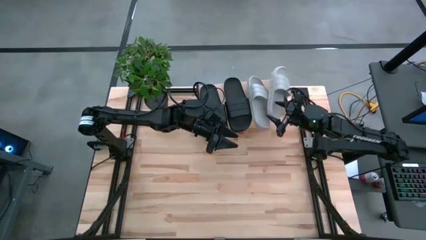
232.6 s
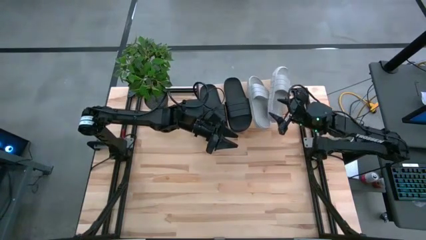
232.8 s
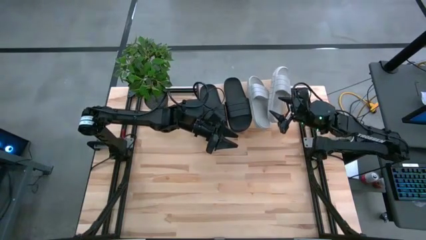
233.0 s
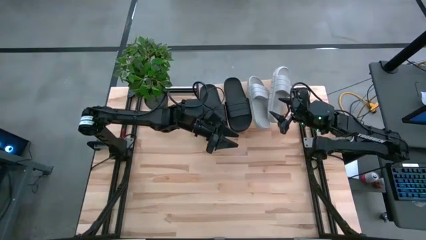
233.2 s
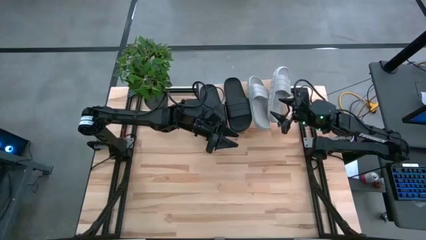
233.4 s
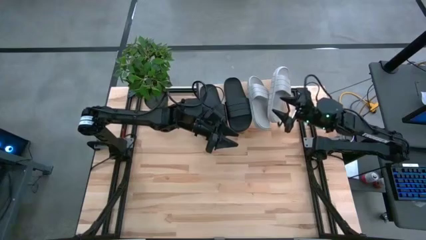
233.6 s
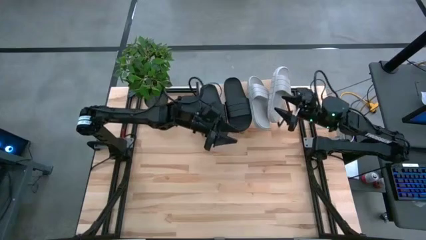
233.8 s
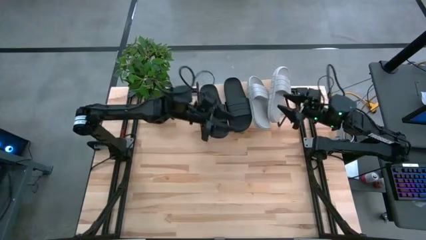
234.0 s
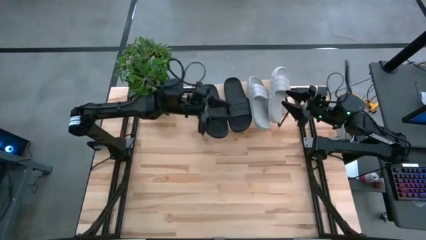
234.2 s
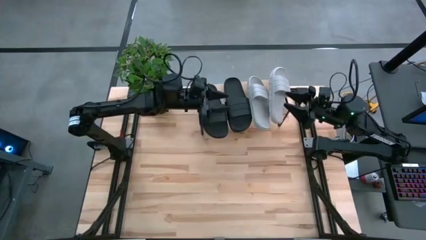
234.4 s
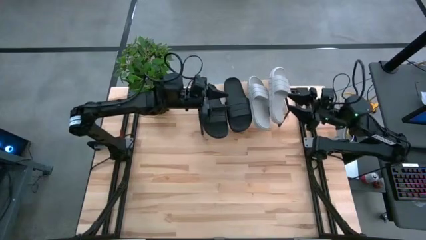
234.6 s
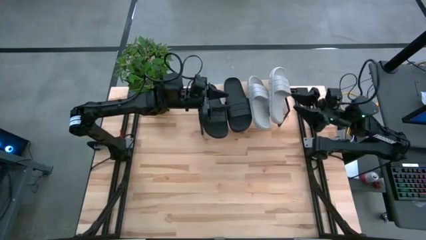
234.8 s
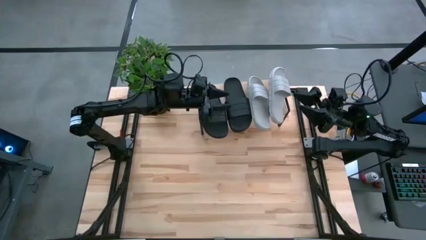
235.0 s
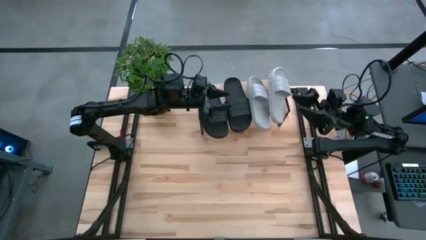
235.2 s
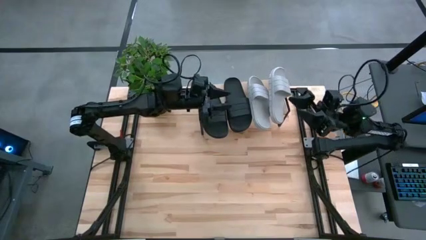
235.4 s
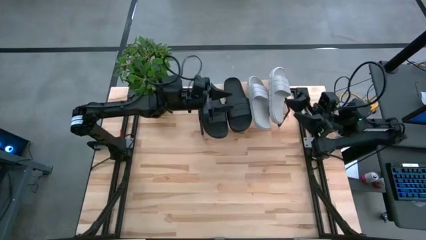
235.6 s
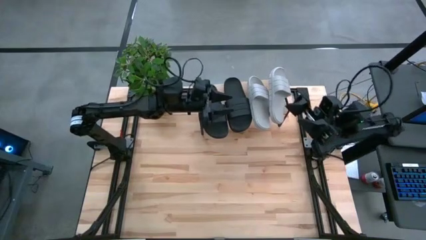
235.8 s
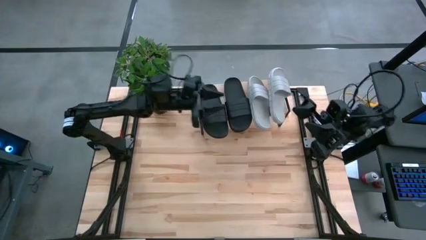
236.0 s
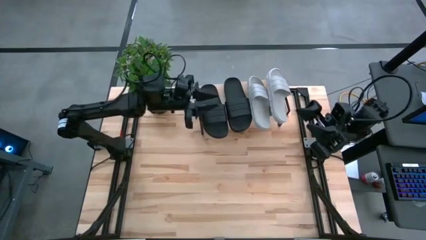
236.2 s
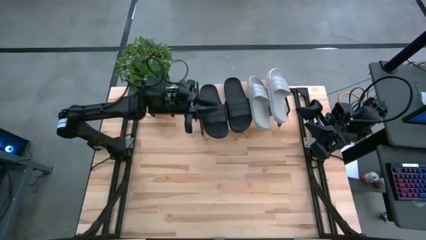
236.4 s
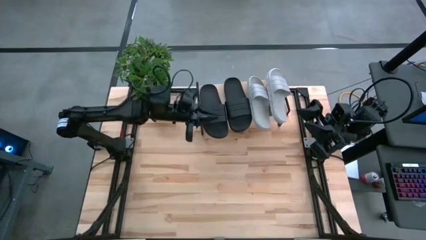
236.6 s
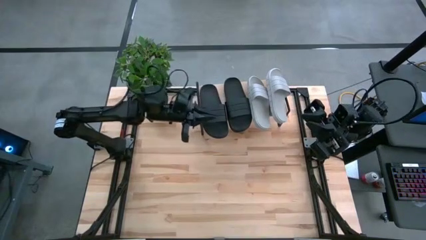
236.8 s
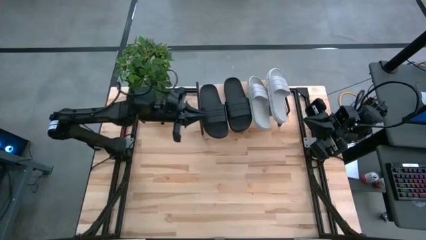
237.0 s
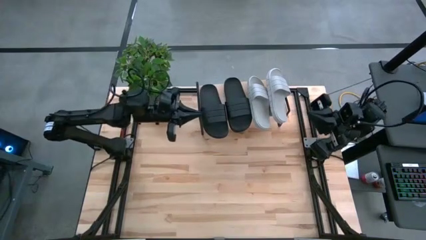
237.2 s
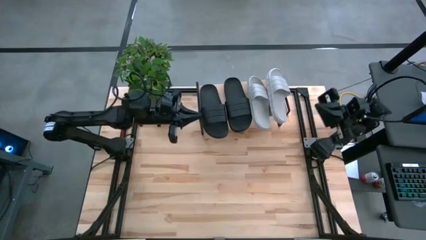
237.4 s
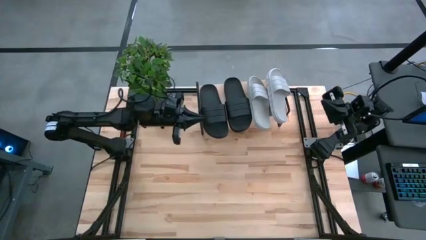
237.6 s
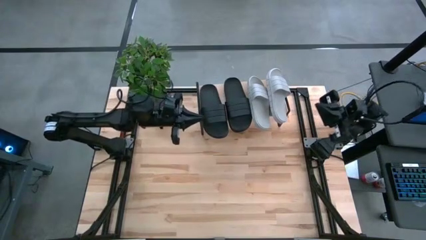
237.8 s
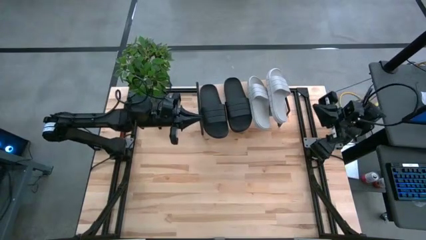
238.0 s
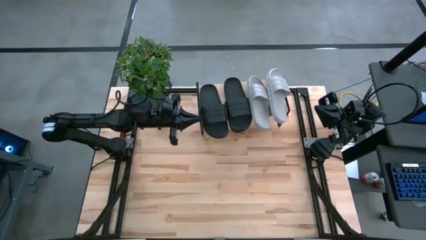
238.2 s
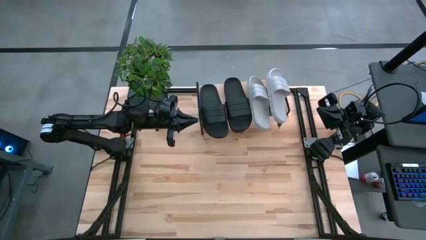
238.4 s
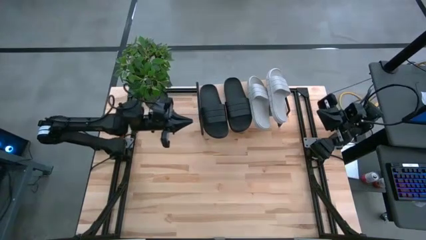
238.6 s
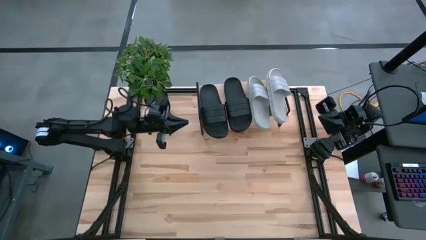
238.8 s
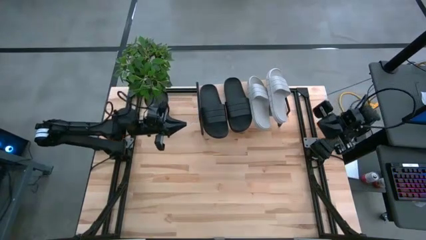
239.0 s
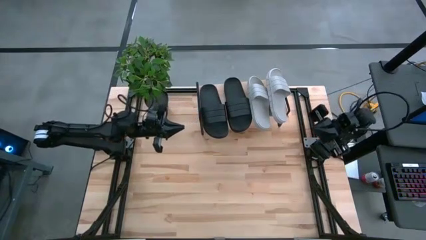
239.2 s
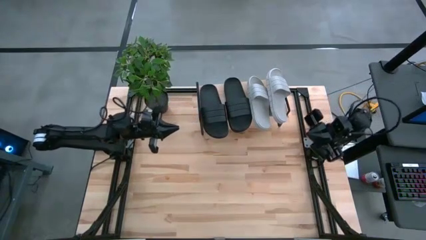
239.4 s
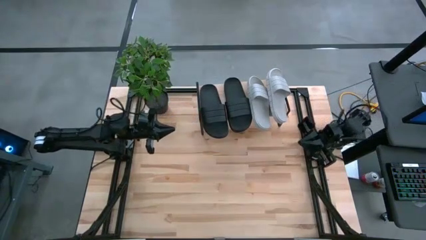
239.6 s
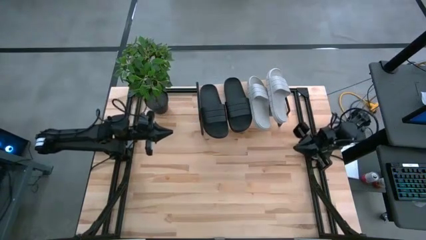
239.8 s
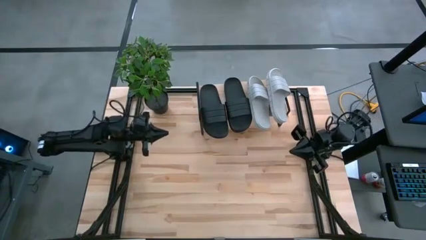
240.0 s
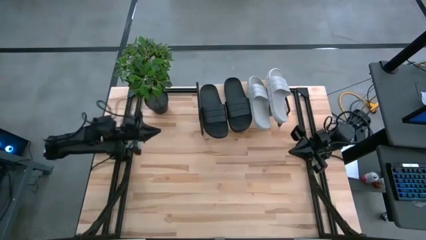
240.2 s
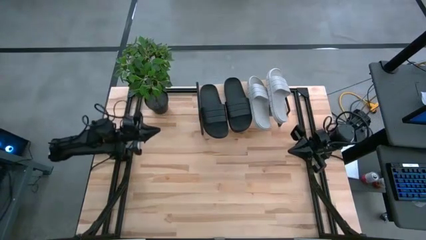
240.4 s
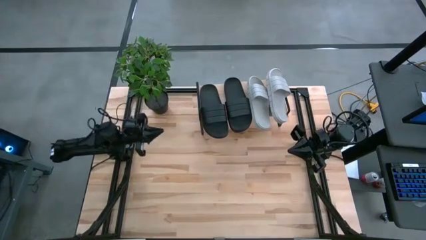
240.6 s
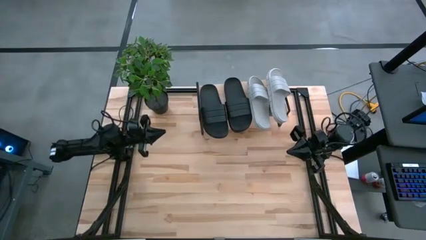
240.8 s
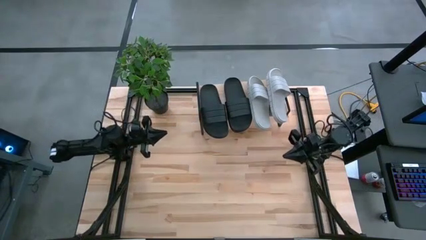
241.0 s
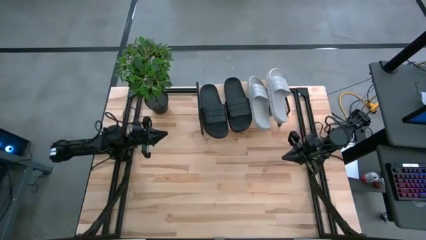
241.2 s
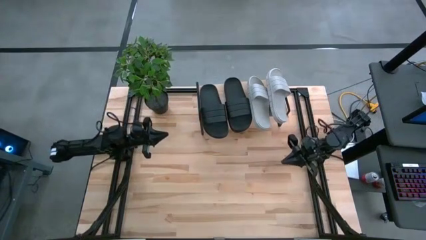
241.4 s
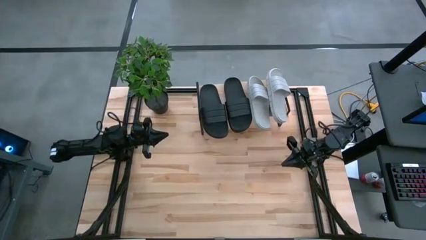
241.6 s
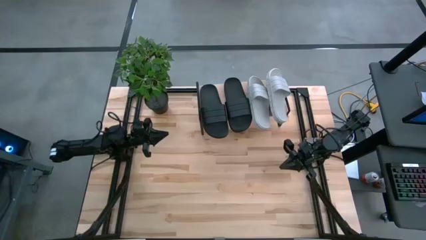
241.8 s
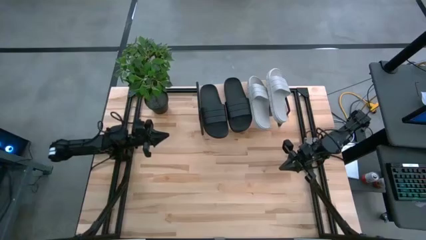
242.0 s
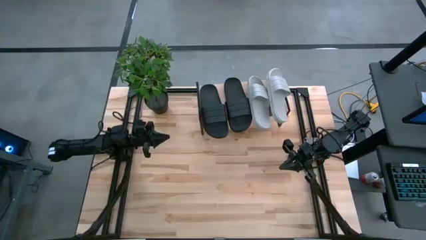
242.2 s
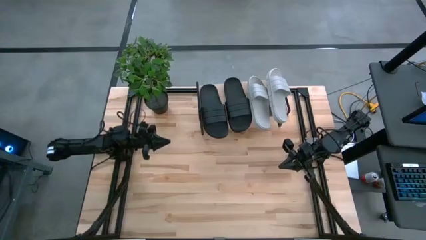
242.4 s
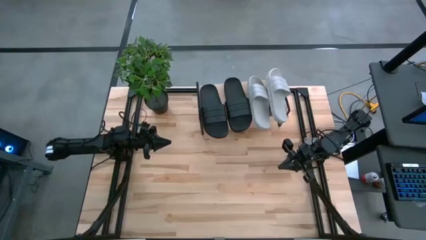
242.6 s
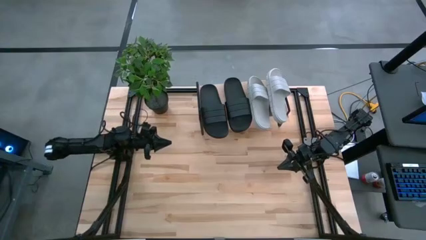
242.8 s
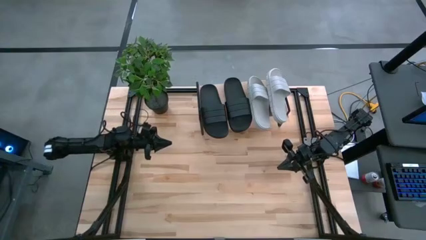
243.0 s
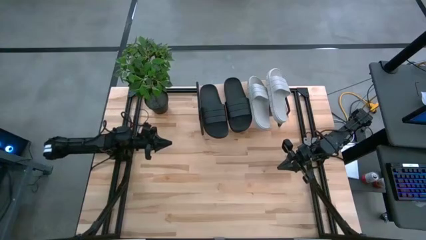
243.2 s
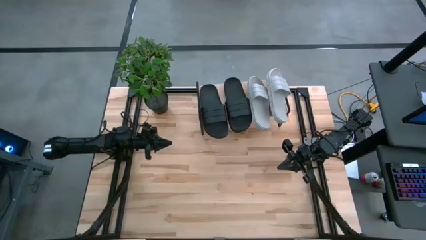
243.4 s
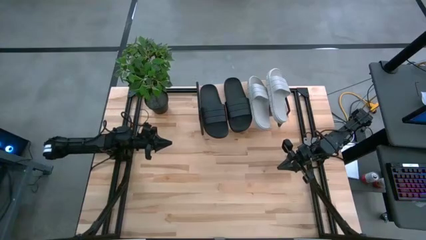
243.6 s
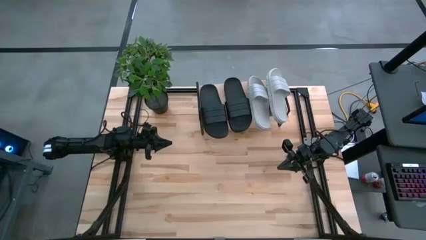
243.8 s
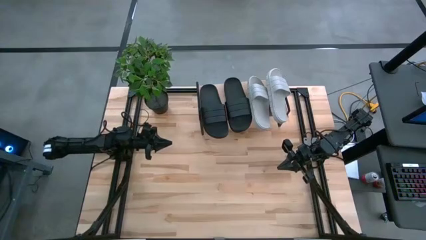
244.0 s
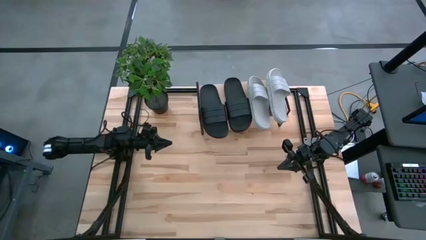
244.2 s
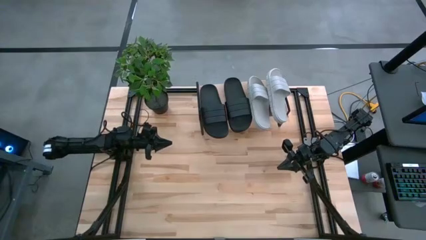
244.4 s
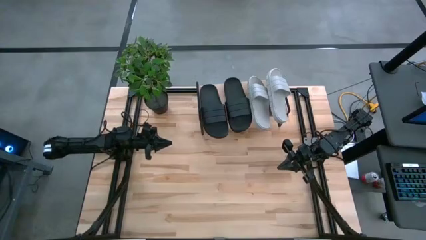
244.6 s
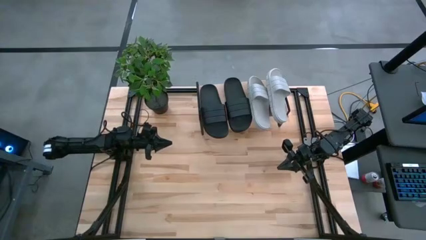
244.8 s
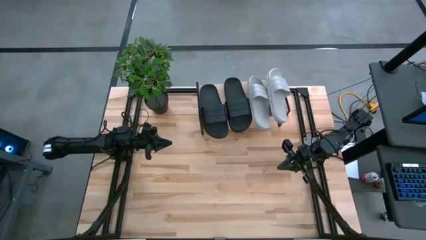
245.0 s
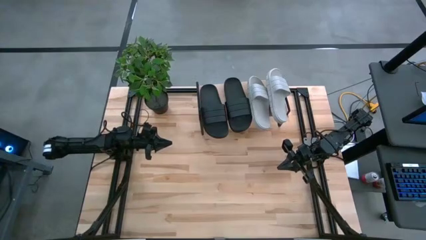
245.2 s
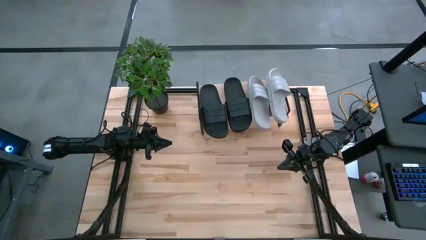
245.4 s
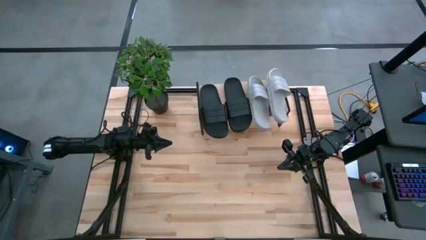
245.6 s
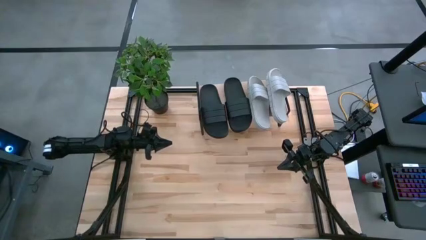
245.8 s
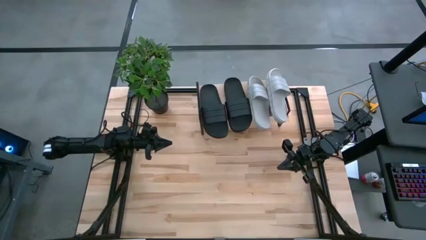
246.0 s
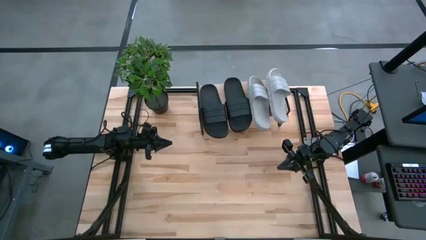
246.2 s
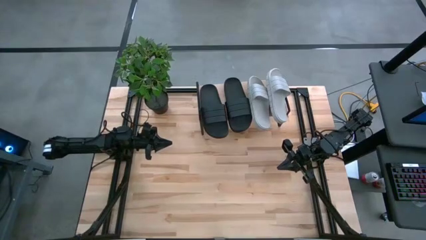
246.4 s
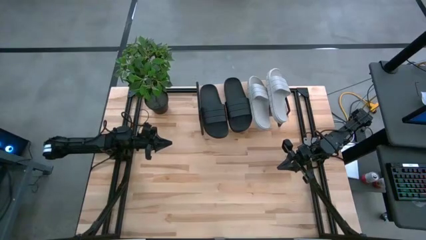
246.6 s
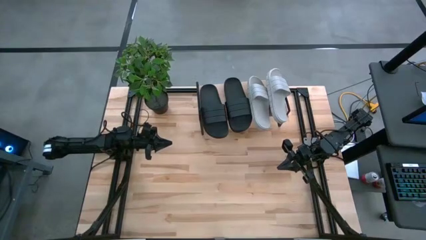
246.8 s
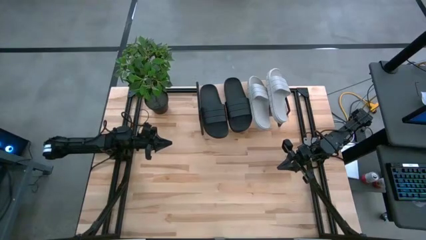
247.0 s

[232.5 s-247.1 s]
Task: Pick and place slides into the shelf
Return to Home Position

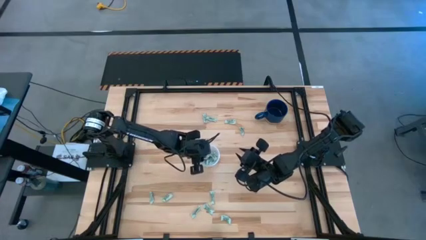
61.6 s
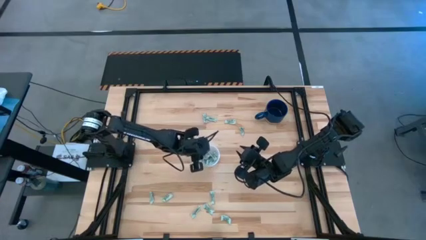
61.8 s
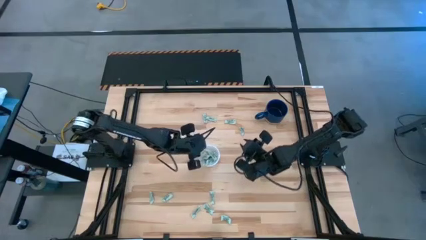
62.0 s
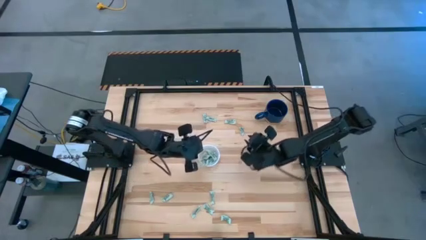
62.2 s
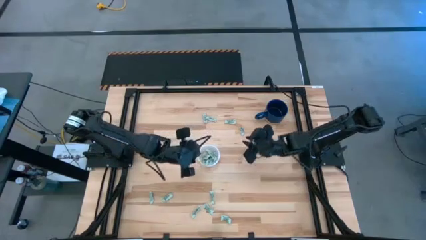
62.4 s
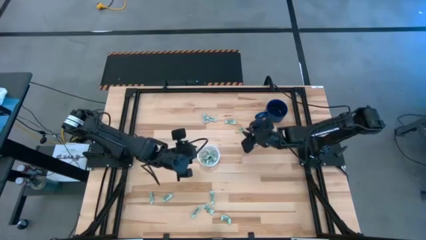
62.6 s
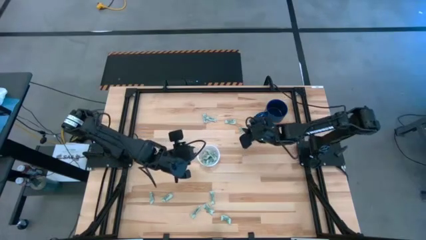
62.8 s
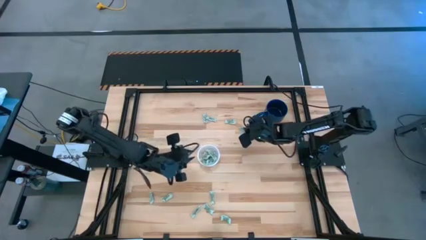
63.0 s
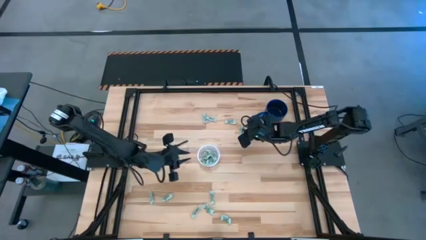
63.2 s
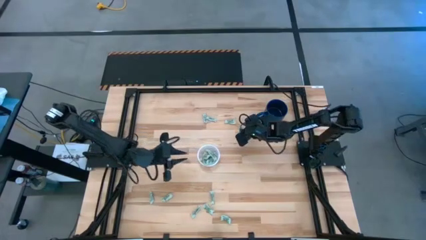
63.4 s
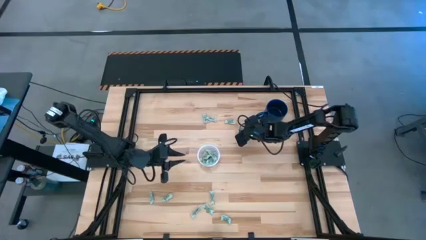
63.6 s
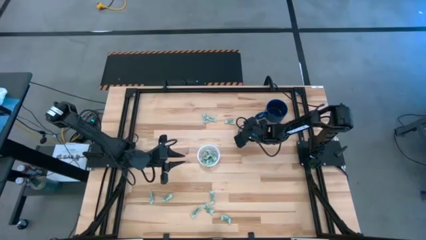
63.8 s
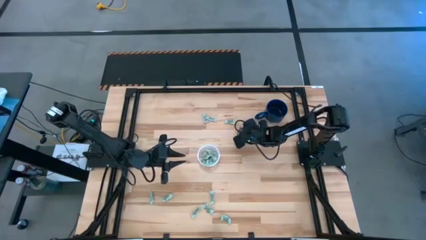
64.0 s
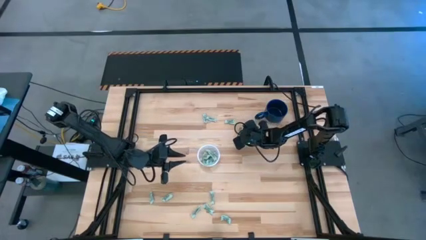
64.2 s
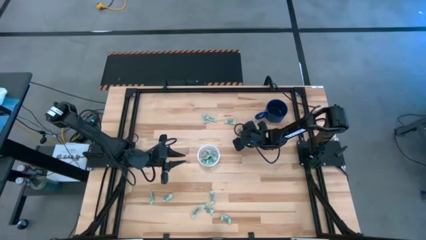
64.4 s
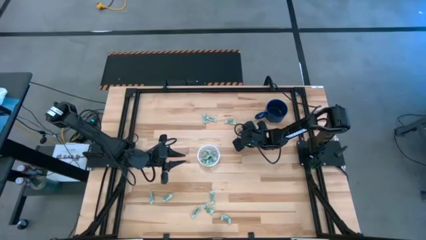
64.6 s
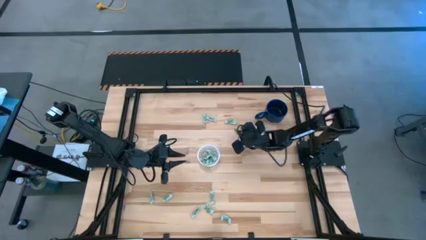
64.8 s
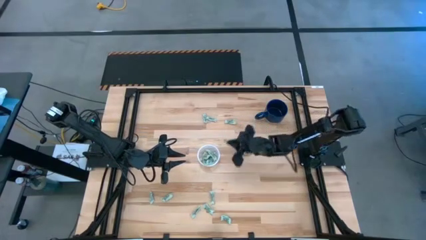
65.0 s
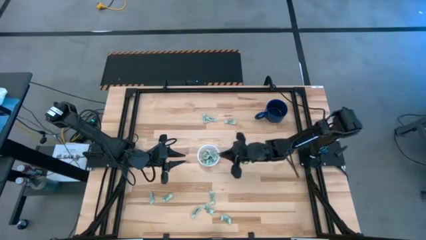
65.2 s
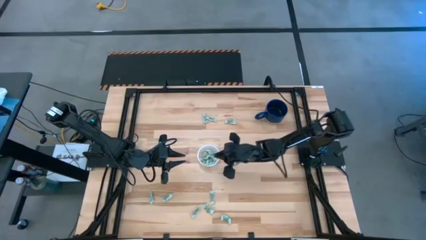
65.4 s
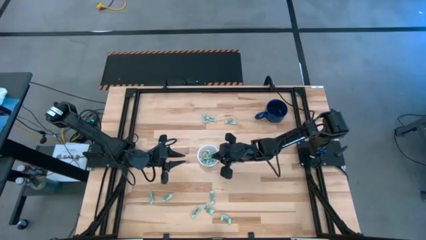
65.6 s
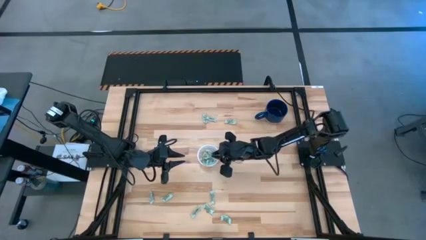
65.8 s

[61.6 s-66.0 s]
Task: Pick and place items into bin
Put the stevia packet into the transparent bin
